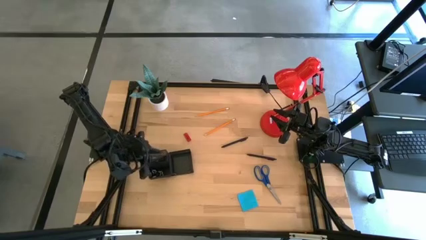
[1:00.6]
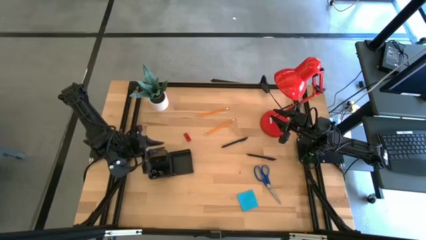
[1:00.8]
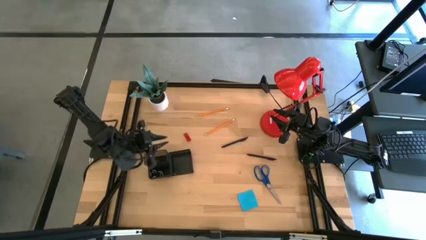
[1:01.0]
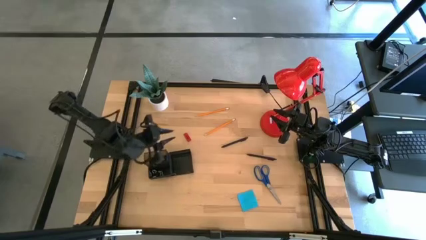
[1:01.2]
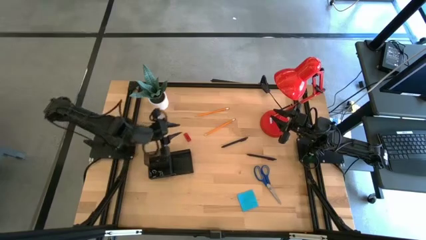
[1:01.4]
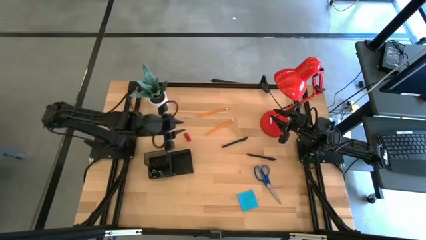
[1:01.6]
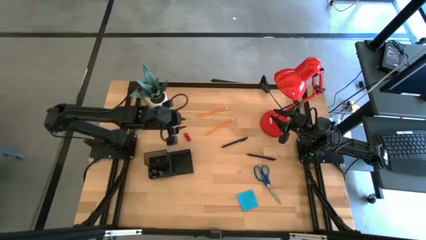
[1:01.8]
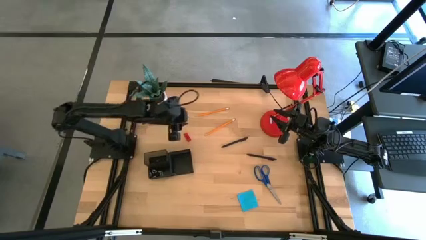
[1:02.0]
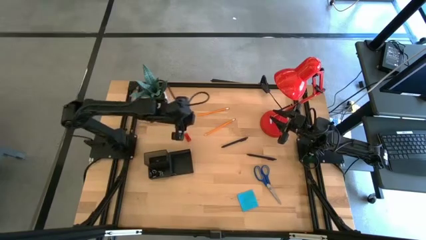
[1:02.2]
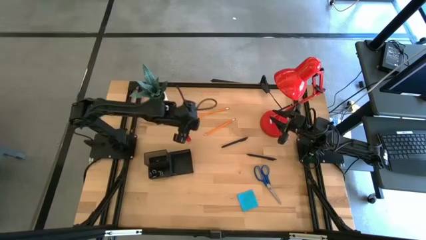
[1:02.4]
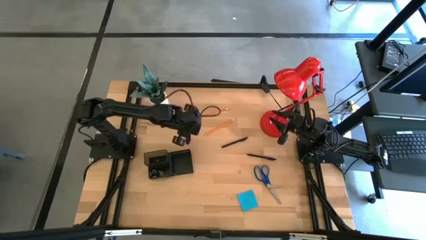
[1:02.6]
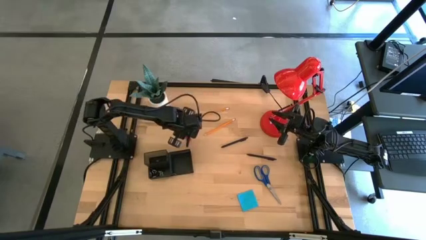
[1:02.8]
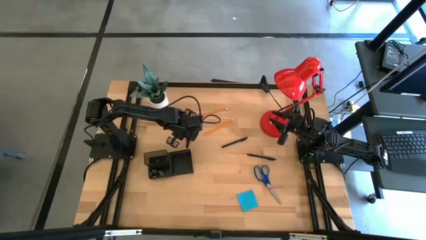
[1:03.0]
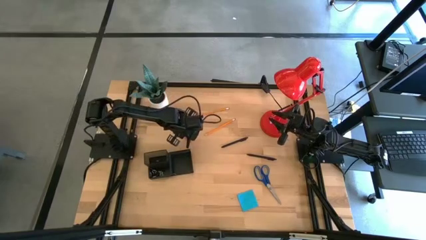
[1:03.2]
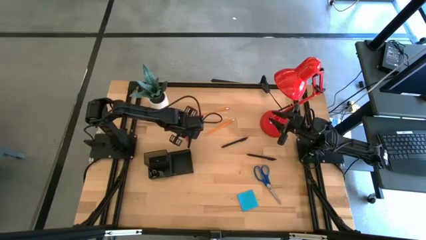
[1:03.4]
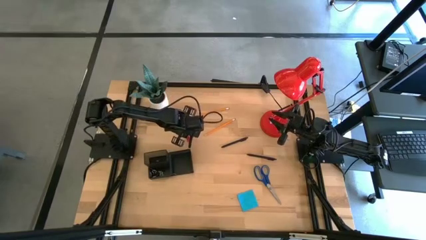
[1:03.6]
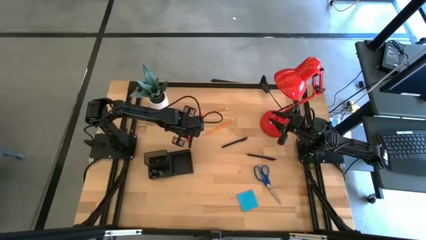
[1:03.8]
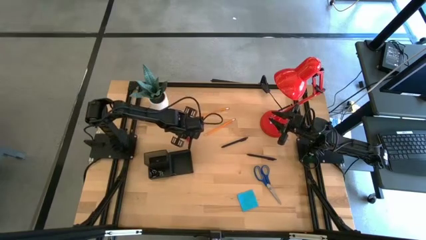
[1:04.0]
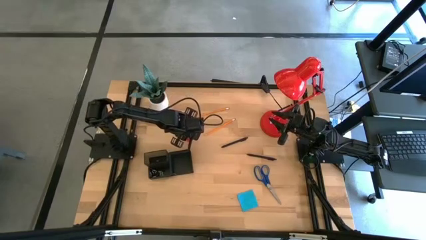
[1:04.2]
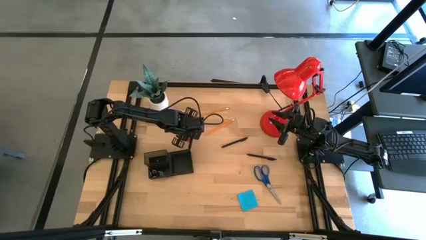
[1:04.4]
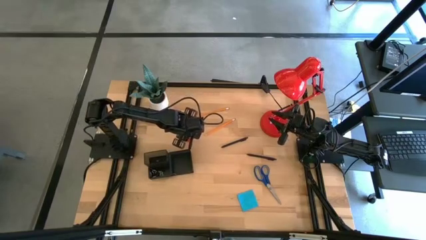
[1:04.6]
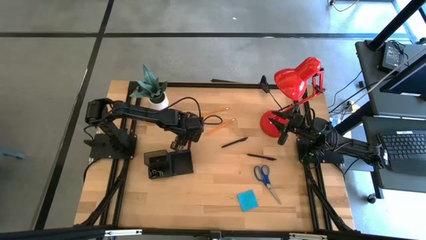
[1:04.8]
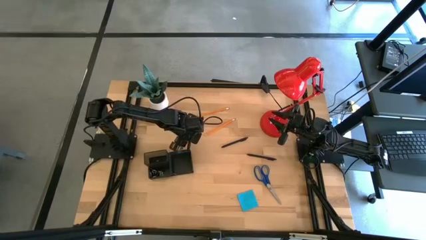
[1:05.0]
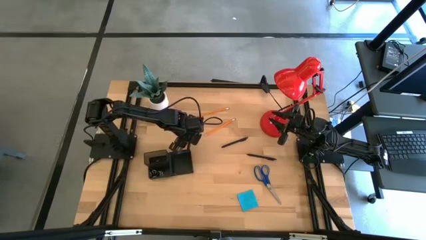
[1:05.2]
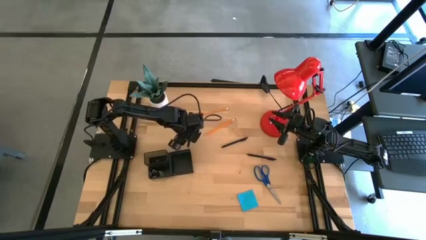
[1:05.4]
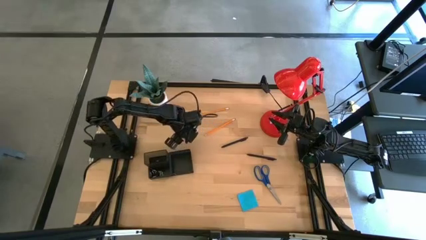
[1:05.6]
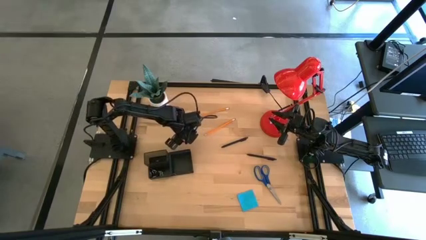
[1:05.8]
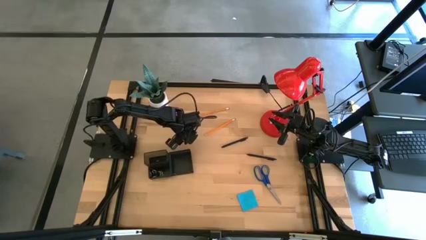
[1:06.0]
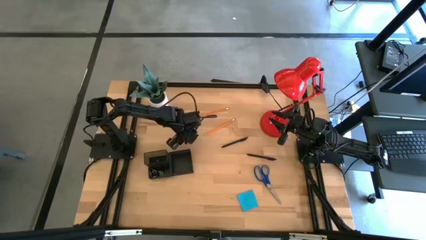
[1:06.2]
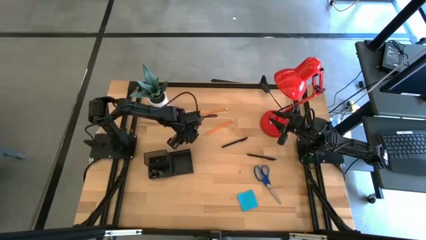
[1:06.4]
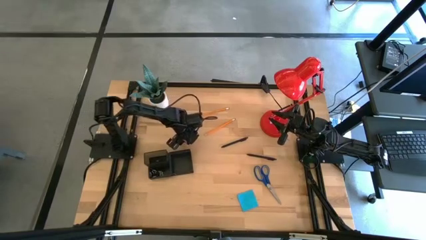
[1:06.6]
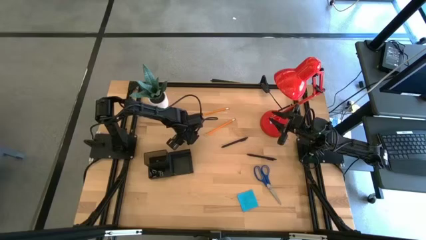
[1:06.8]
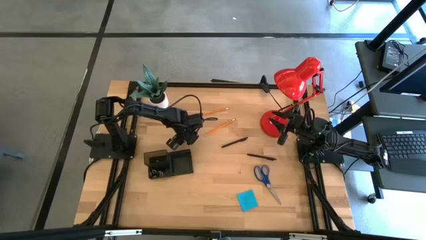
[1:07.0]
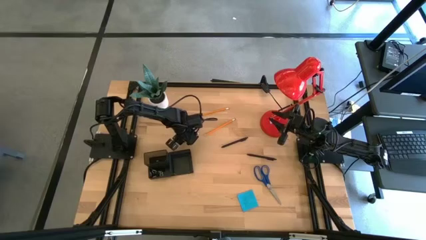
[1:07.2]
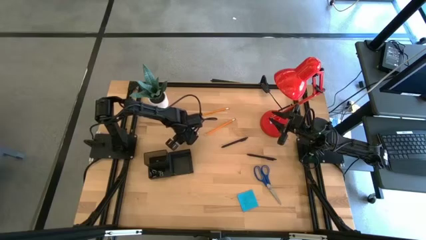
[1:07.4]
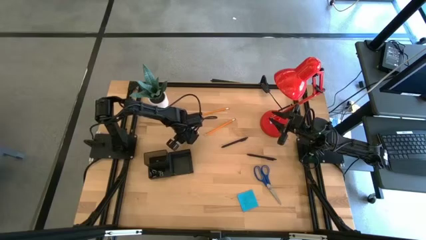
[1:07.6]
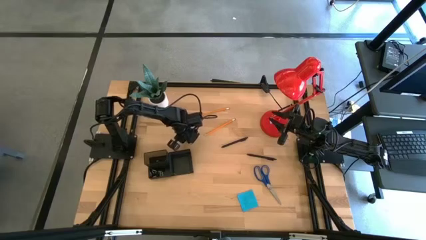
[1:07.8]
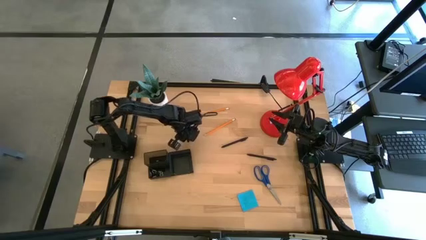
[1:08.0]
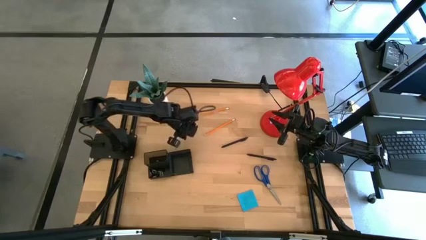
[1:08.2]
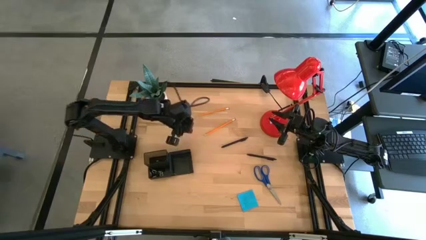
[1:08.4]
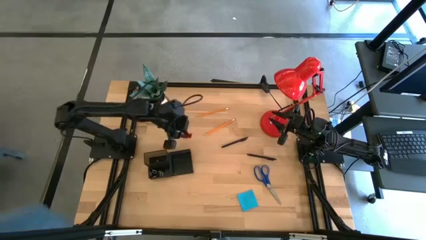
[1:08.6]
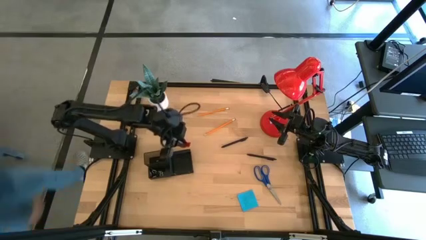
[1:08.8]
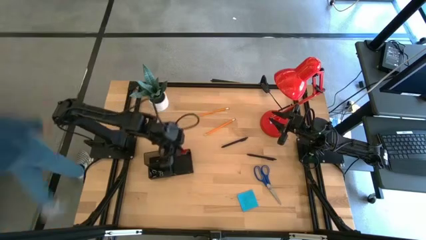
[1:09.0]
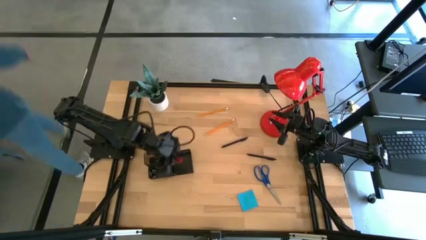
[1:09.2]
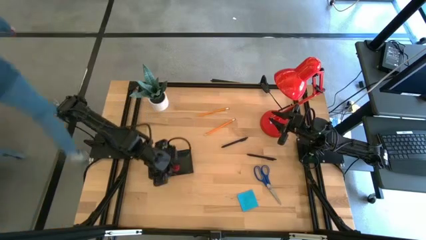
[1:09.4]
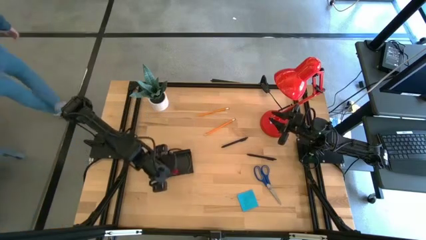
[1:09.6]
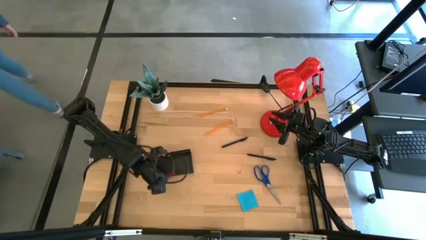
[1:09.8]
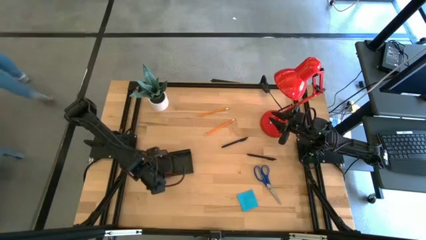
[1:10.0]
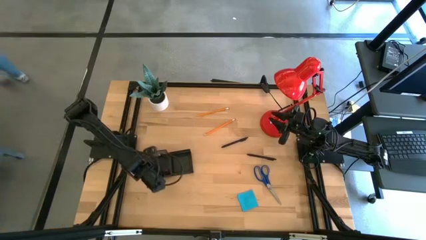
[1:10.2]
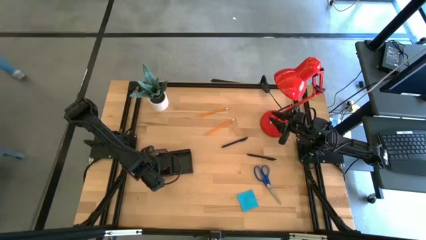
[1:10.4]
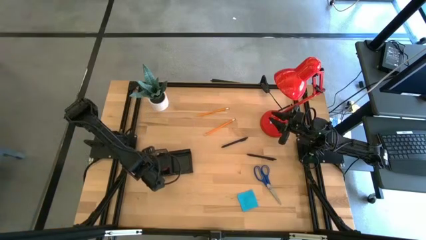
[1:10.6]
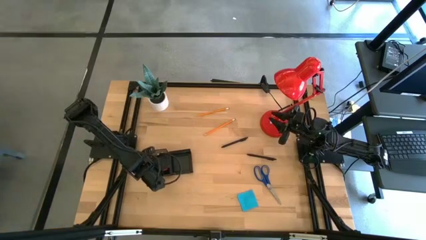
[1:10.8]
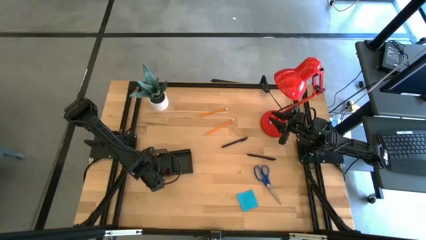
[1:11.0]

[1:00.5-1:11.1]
Task: Pick and place office supplies into organizer
Put the red eraser into the front left compartment of the desk organizer
